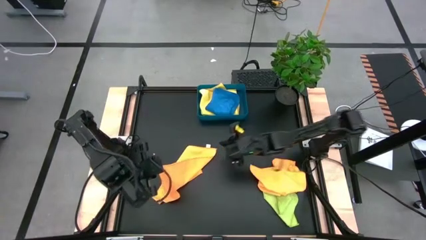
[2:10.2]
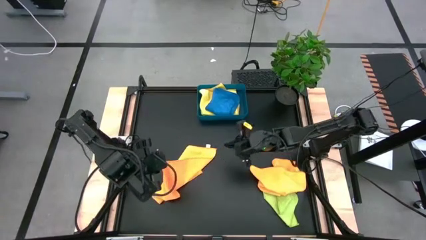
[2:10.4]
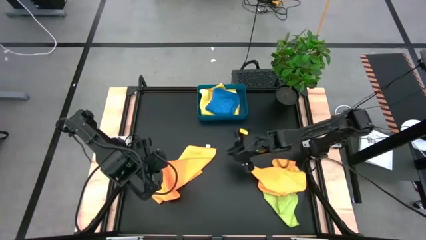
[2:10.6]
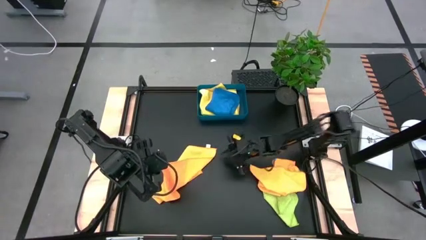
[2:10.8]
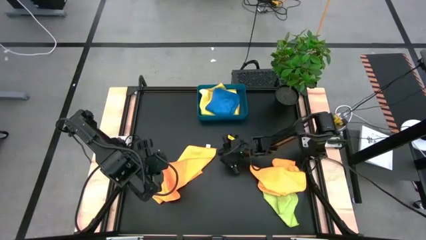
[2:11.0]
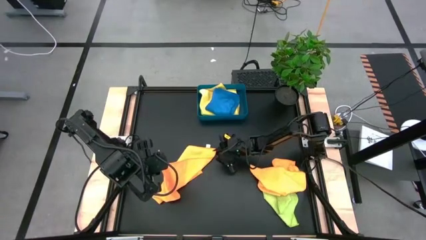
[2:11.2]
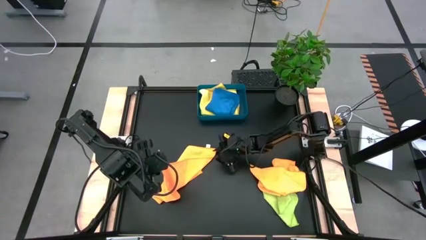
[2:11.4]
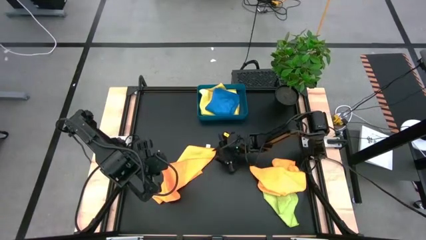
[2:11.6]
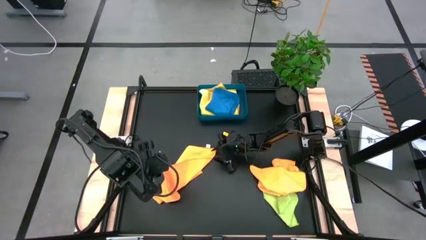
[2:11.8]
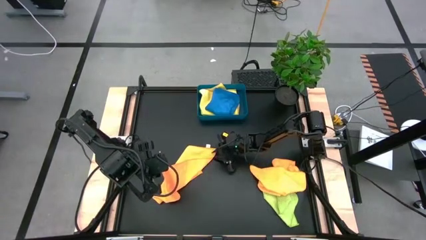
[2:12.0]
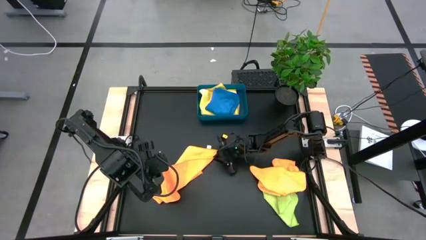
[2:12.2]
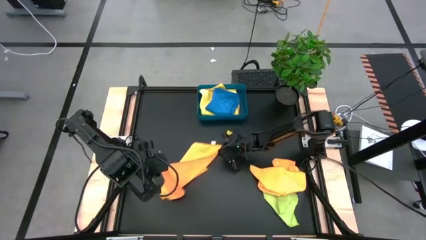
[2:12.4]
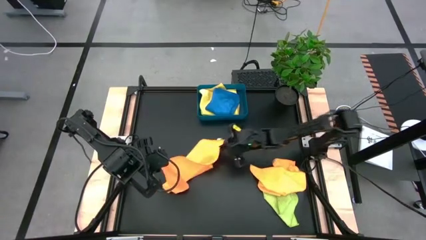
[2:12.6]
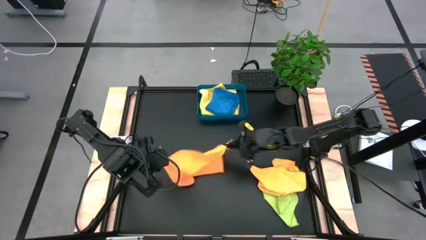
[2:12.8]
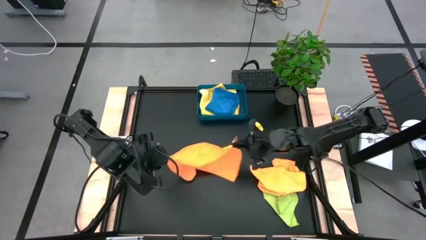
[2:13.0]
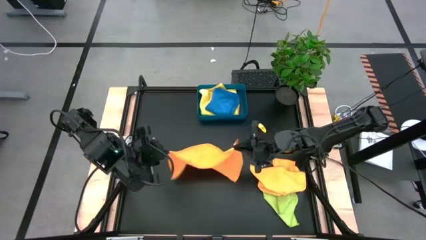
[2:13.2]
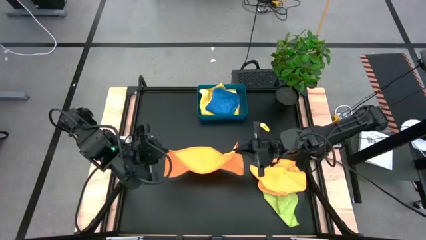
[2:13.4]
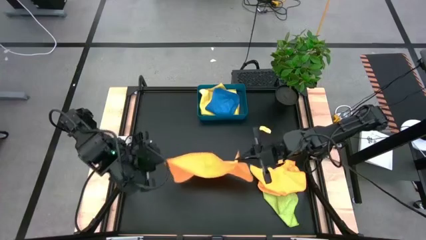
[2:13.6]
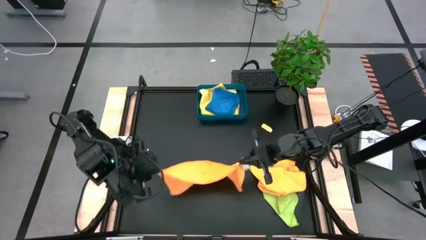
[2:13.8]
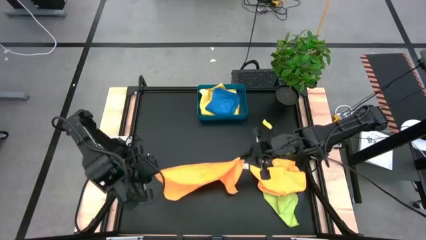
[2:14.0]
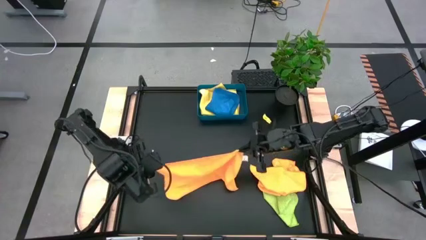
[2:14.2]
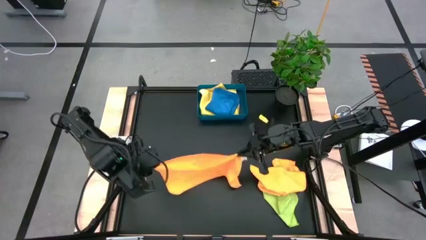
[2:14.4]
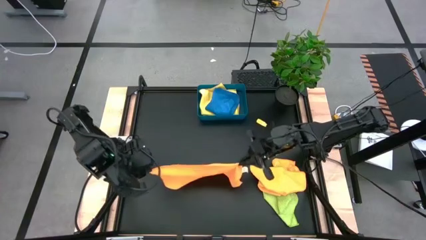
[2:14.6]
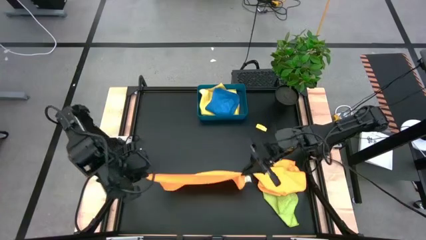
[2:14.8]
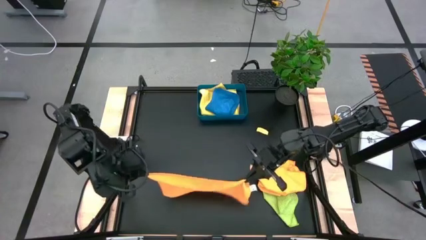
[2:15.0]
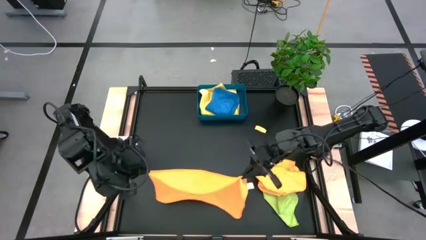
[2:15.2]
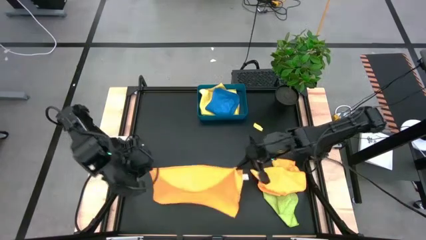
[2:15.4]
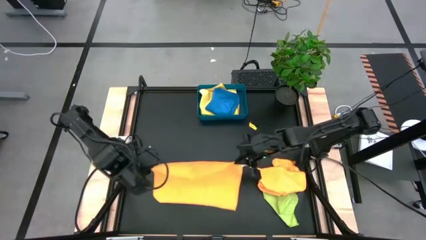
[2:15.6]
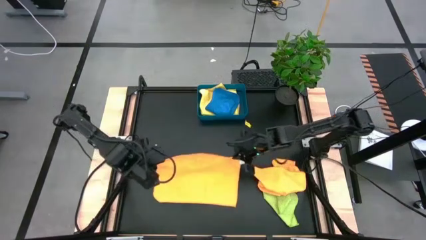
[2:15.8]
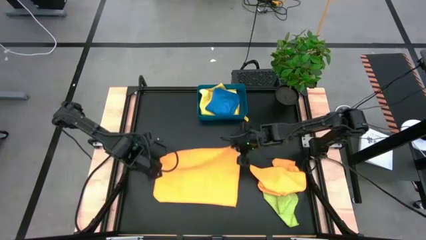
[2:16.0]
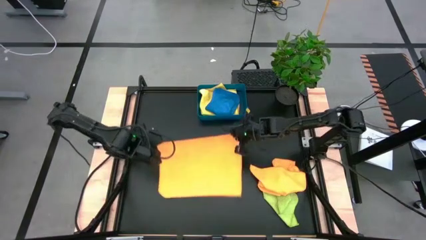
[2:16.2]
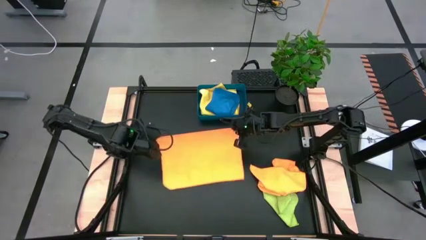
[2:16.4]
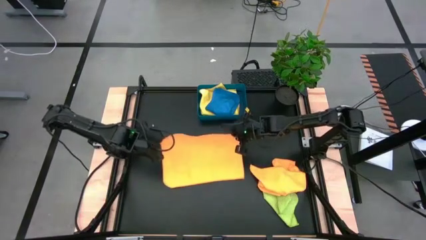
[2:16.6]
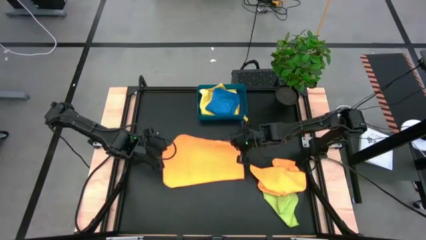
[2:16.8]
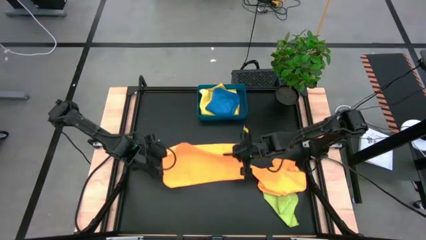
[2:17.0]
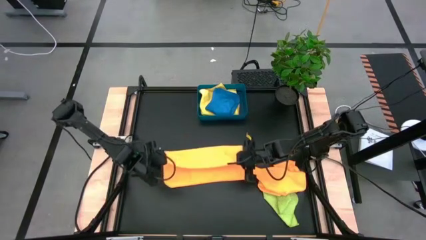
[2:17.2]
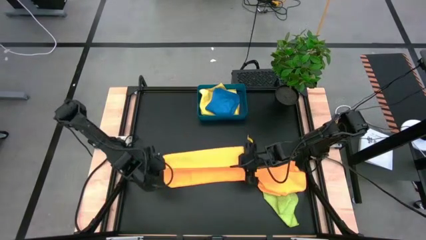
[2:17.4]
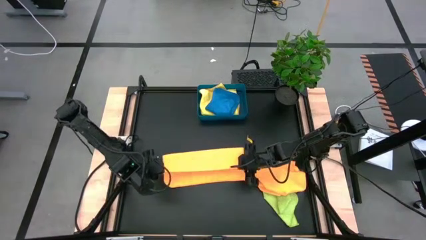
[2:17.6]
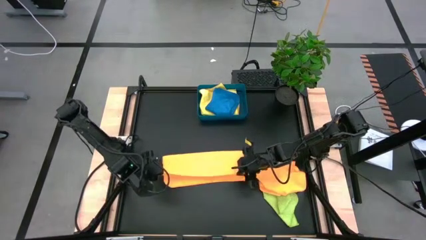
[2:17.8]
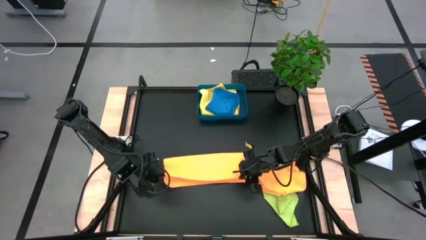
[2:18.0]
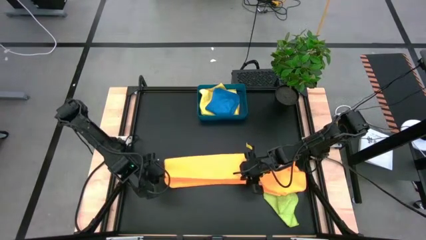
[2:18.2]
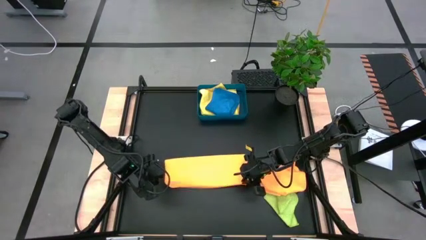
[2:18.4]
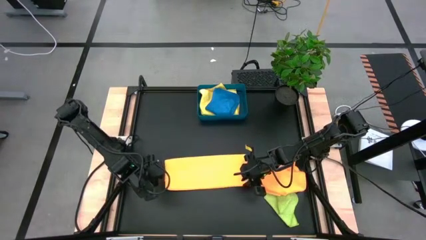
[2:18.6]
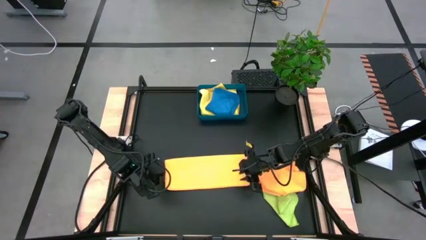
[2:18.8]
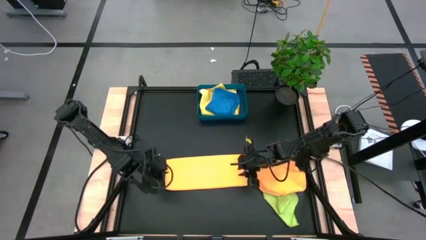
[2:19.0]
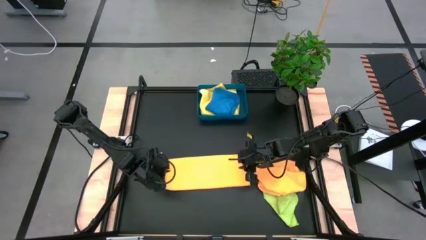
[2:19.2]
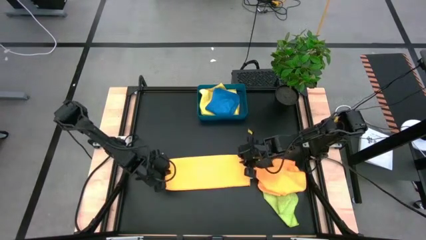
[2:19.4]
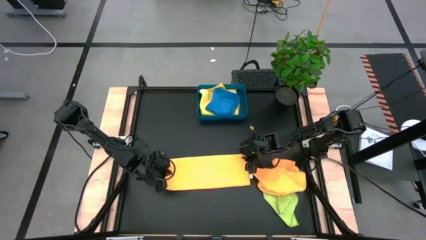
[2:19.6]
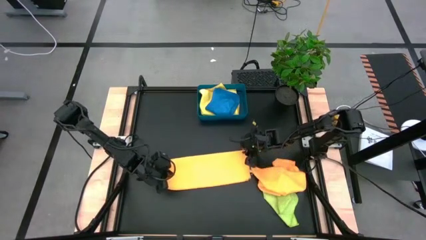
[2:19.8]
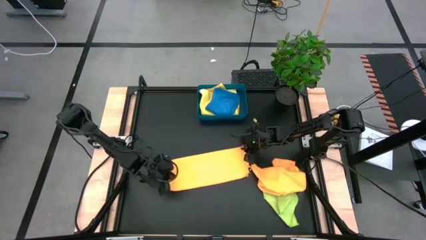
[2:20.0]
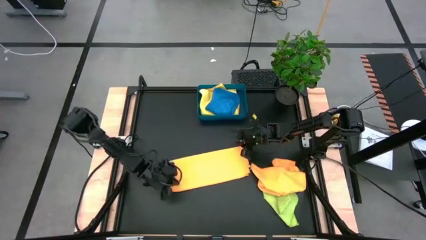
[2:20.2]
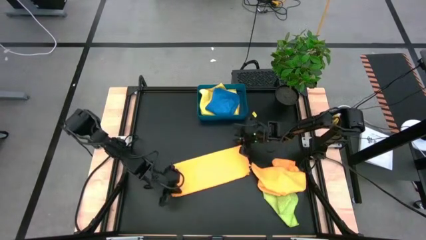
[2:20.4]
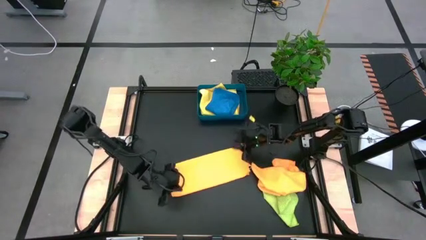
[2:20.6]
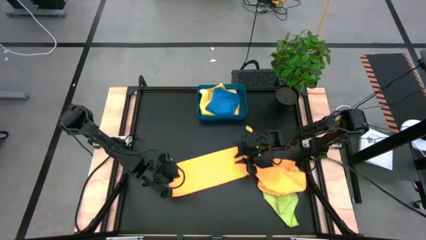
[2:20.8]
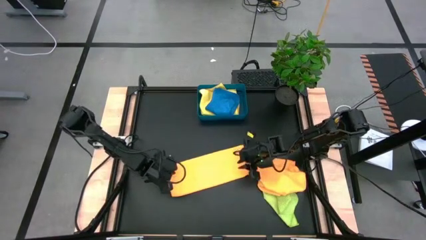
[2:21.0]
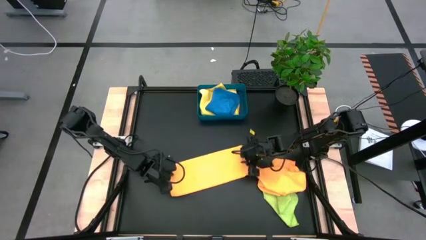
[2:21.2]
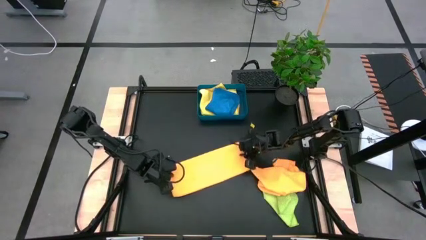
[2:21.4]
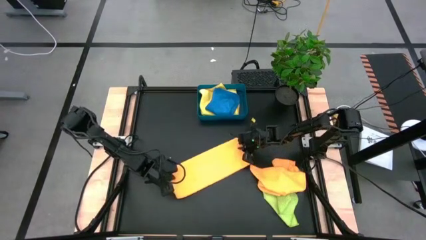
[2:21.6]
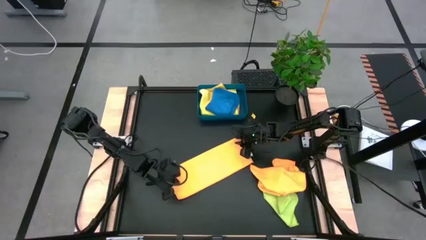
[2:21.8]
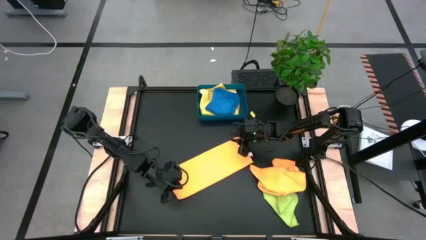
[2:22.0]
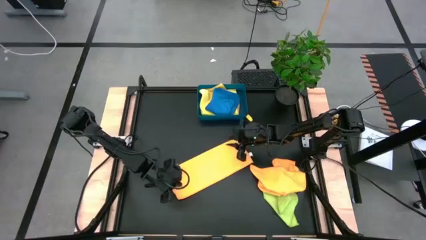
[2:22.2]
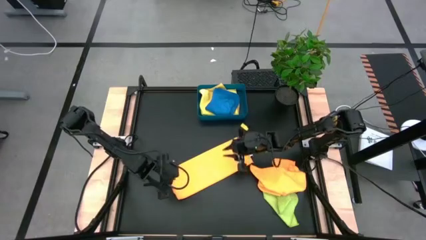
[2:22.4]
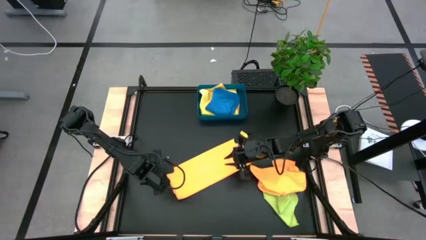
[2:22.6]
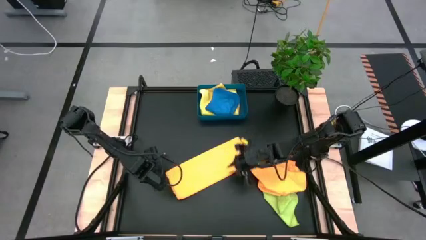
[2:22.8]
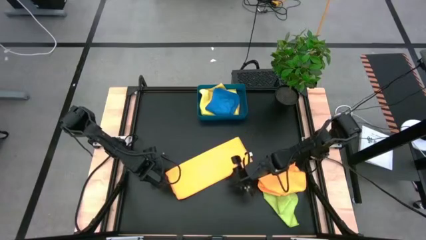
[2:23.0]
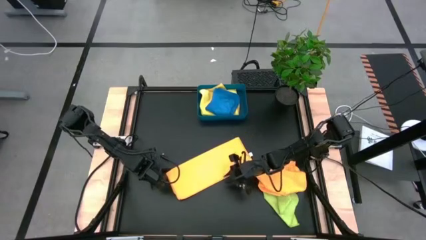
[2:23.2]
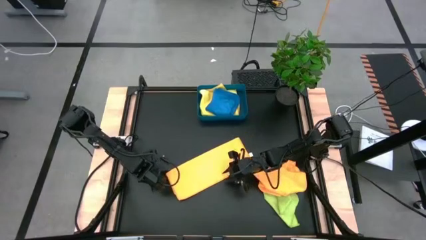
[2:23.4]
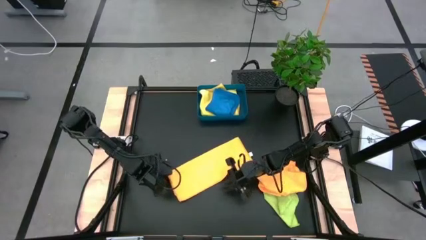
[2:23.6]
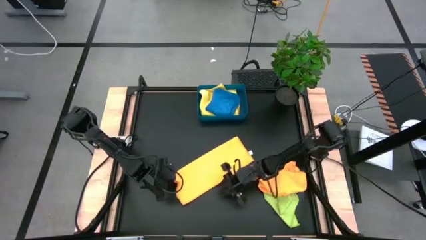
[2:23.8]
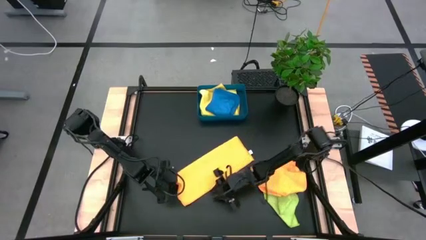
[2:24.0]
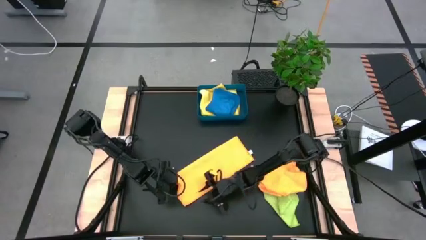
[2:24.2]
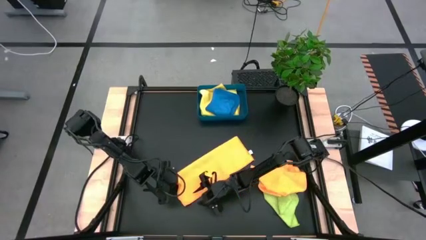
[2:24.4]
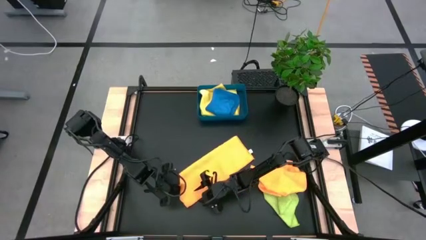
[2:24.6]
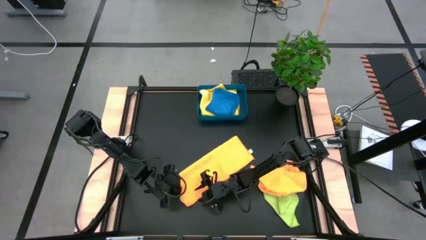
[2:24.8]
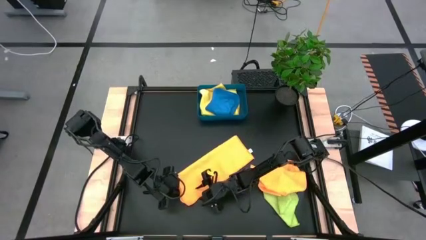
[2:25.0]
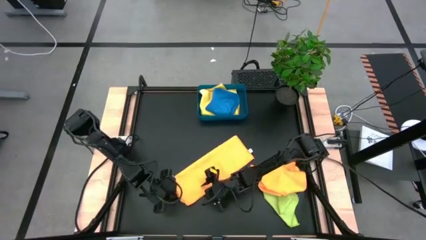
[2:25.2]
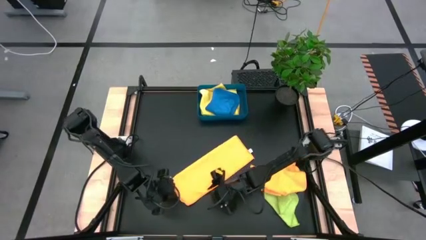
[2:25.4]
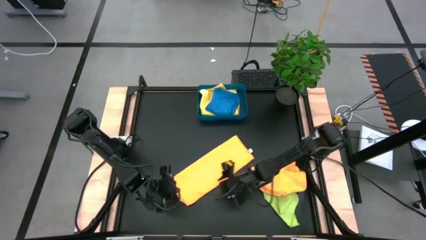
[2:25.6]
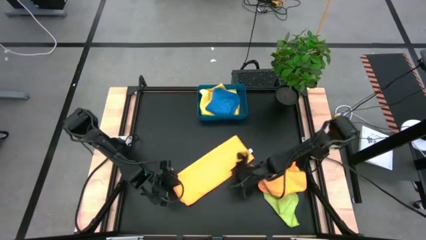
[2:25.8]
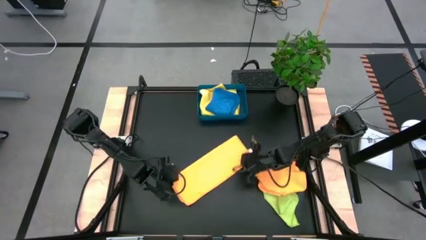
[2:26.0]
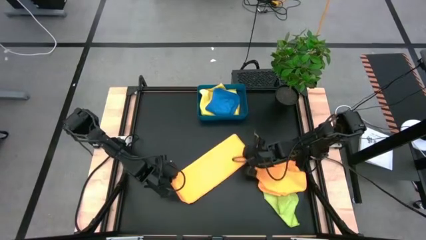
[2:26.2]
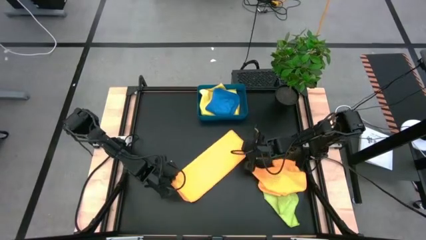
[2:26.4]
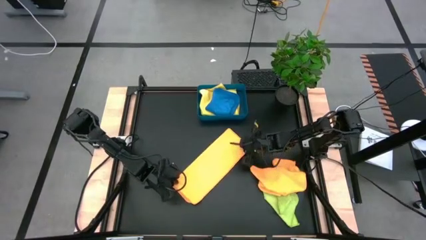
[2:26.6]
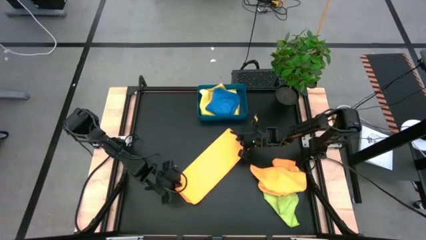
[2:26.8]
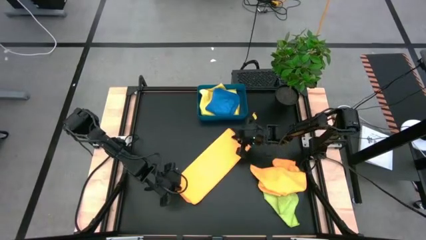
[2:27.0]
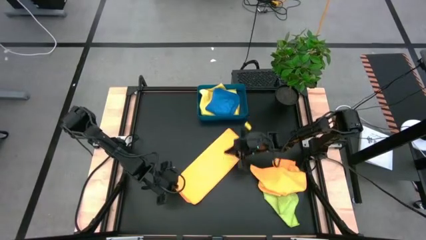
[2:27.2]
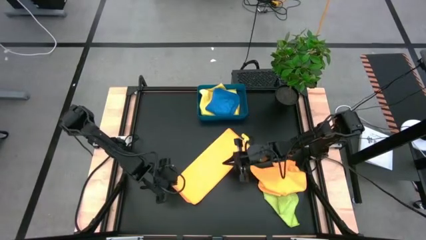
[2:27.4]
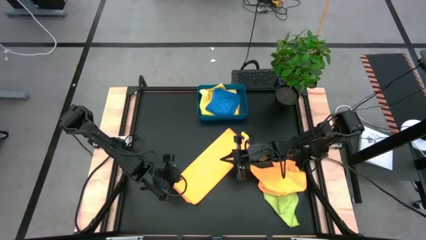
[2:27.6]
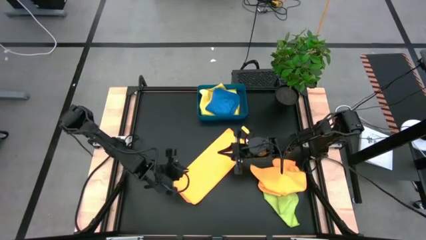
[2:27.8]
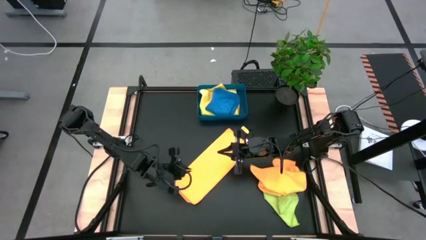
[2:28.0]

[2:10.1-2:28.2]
Task: Fold microfiber towels
Fold the left orange microfiber towel
